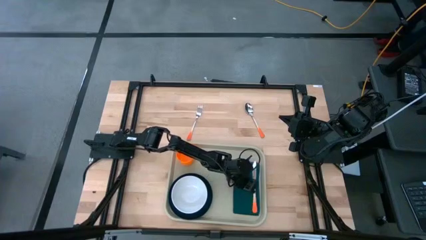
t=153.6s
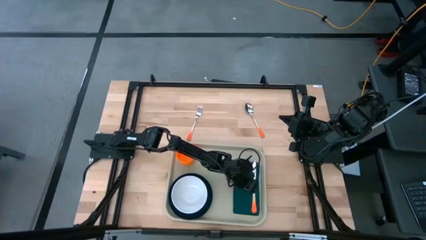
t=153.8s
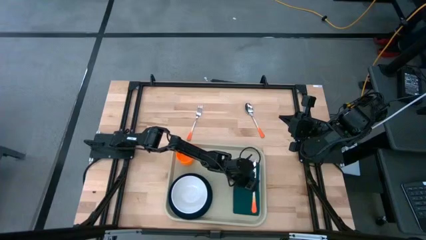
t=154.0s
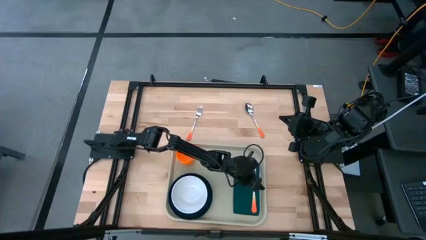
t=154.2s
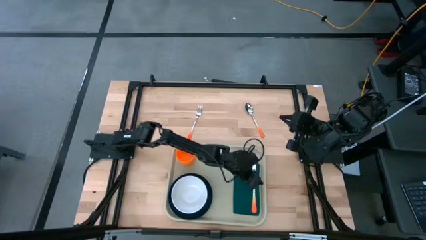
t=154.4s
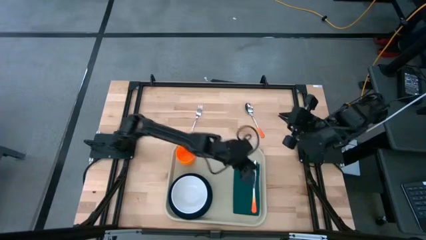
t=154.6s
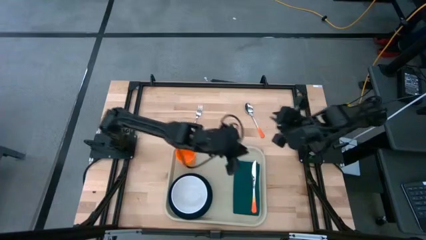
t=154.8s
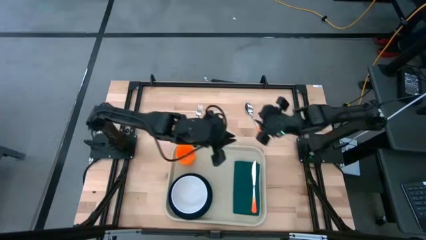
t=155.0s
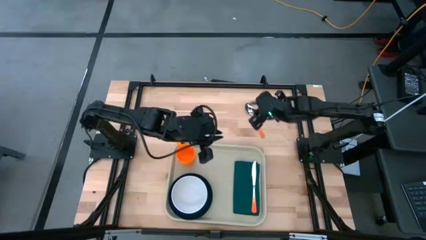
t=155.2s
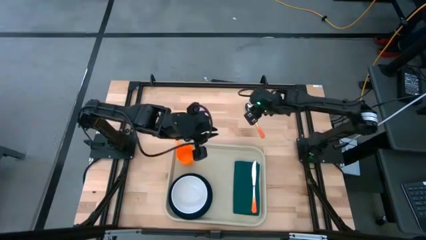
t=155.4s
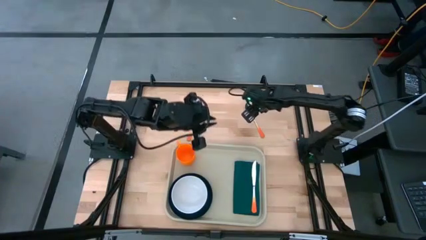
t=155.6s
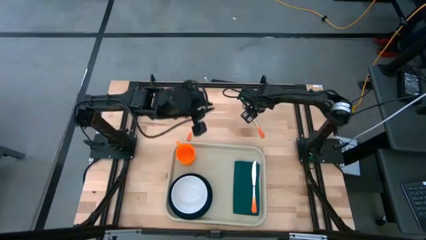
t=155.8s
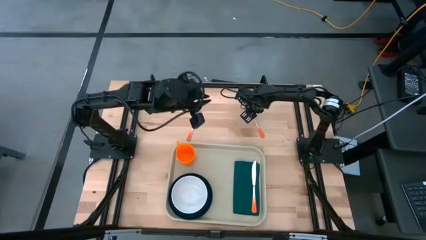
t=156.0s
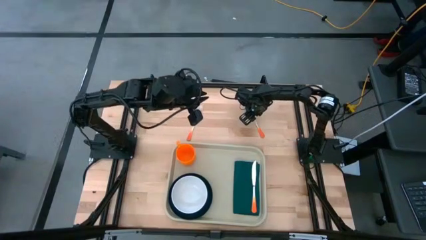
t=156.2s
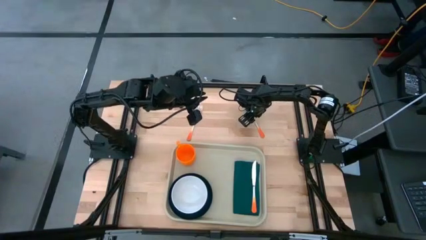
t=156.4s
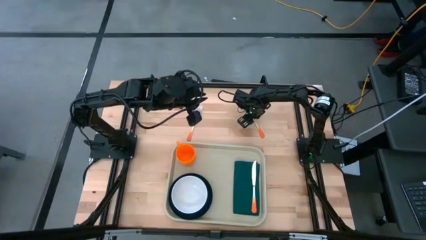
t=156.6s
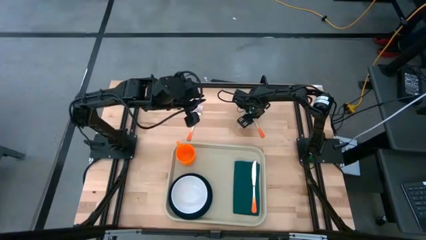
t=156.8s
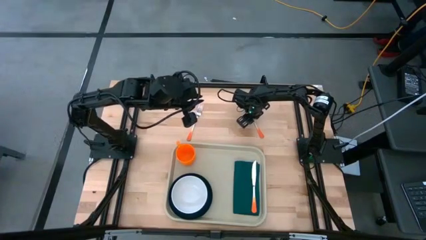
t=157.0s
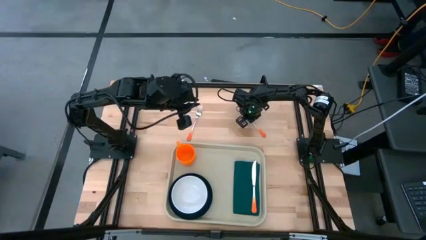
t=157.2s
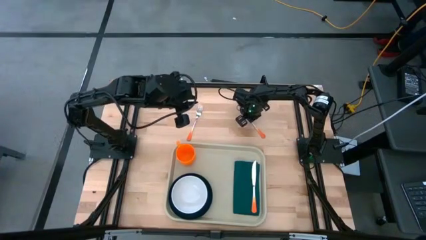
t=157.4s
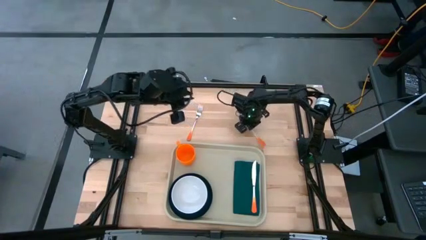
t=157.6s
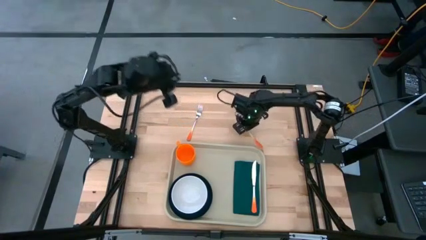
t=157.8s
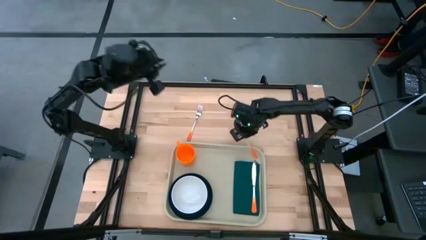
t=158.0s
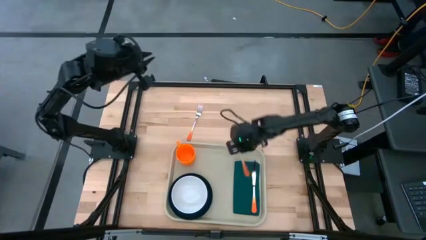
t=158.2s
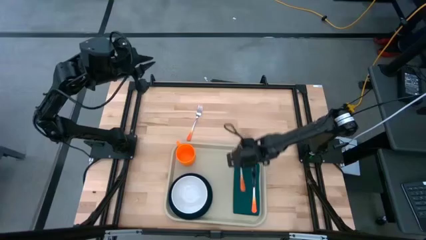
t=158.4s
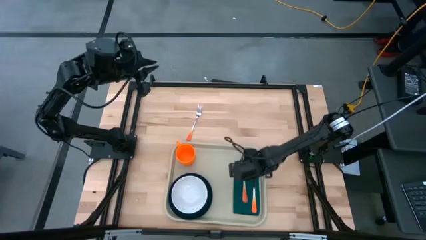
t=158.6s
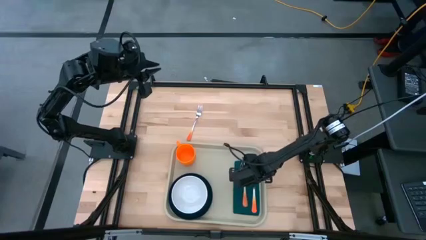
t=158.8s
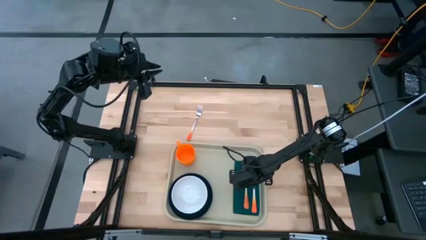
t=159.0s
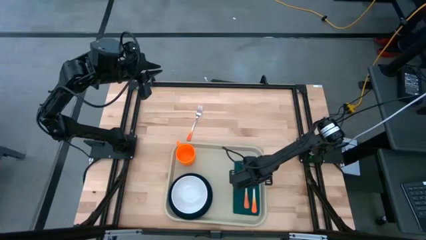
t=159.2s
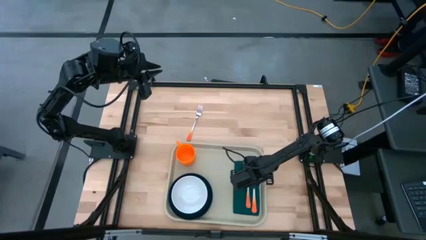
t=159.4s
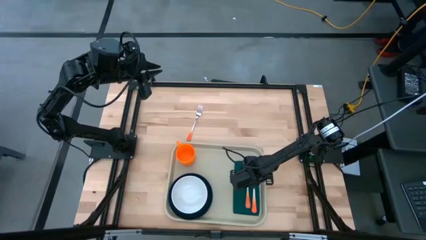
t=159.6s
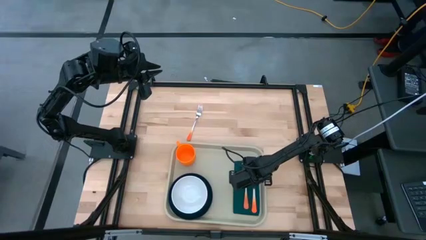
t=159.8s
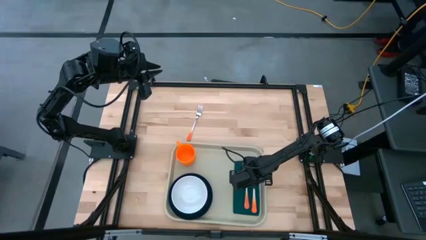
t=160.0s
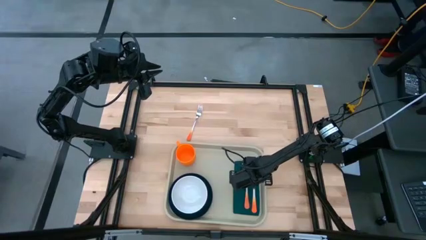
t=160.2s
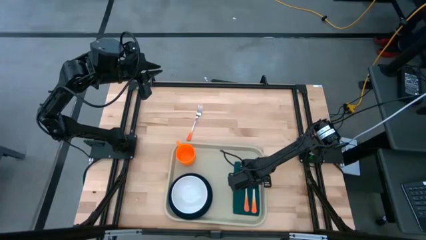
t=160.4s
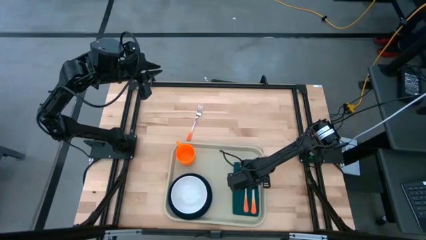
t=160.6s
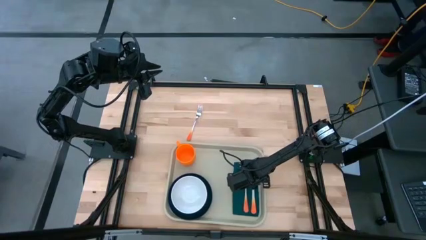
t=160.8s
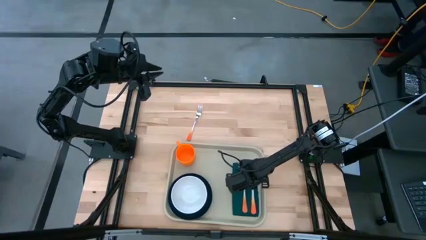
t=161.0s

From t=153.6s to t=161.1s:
Task: Set up tray
Put the spoon on the napkin to the left of the knife

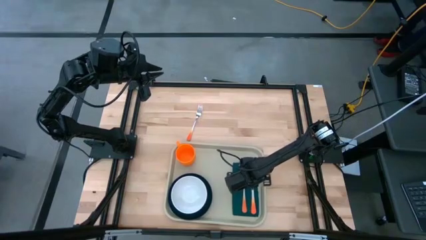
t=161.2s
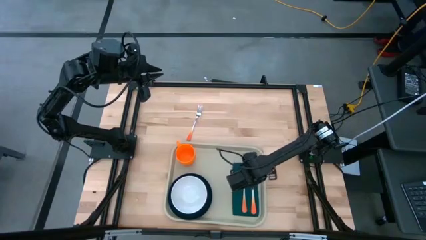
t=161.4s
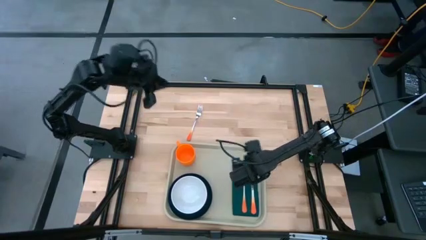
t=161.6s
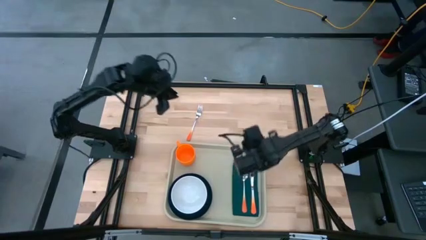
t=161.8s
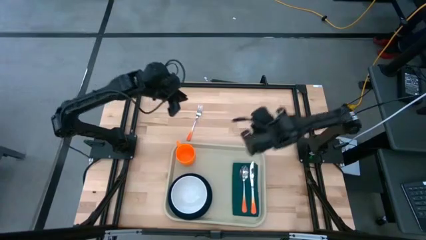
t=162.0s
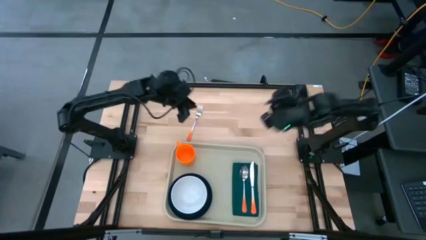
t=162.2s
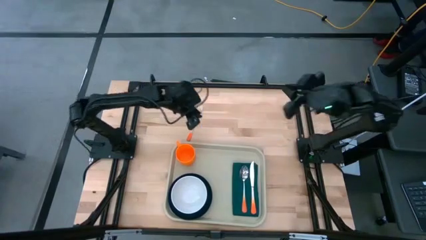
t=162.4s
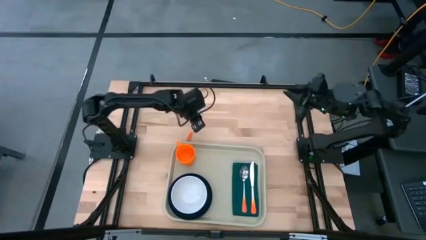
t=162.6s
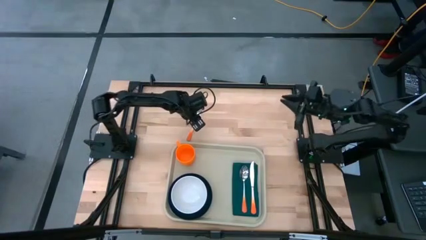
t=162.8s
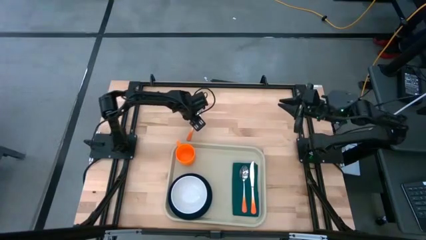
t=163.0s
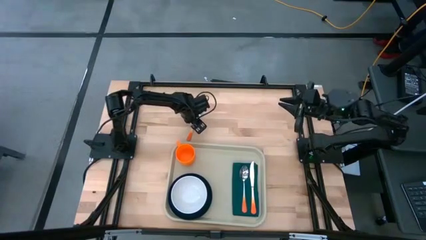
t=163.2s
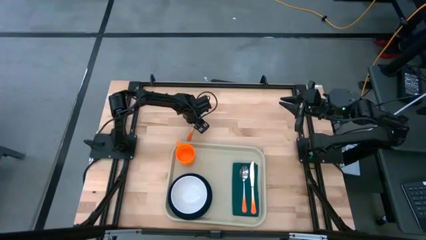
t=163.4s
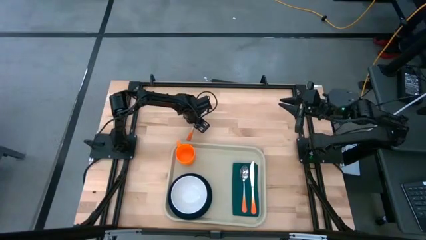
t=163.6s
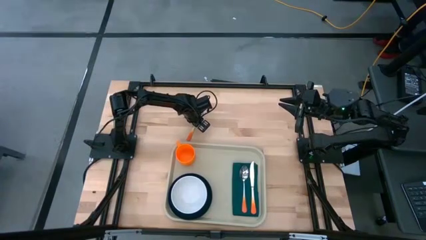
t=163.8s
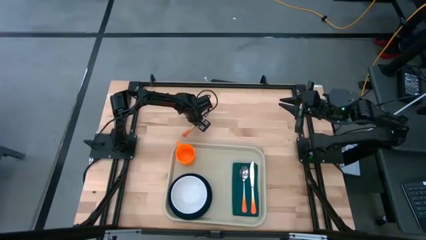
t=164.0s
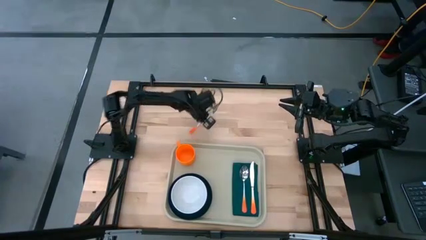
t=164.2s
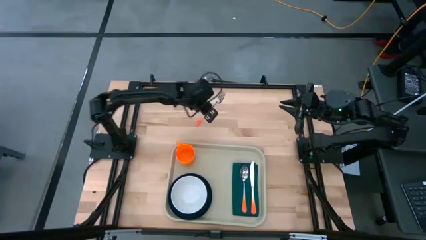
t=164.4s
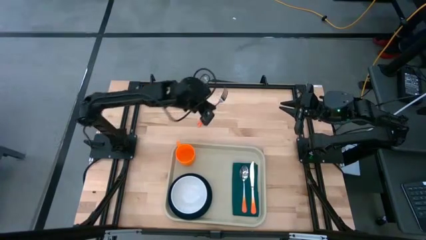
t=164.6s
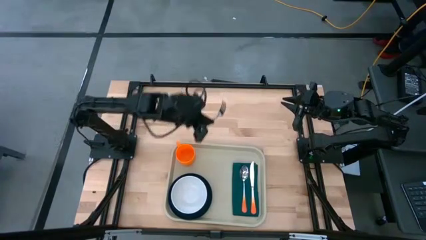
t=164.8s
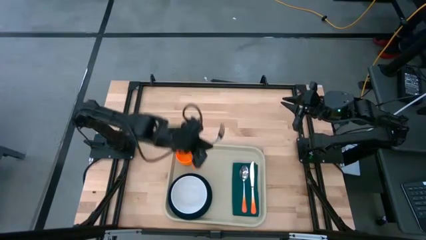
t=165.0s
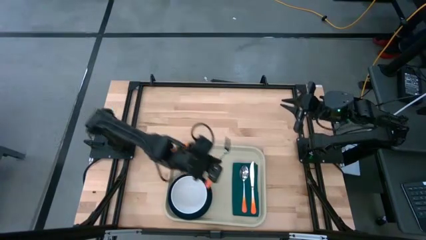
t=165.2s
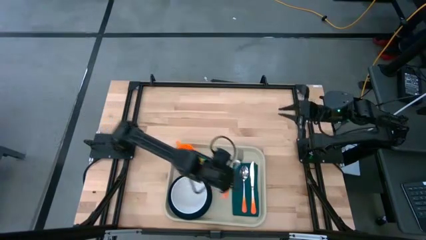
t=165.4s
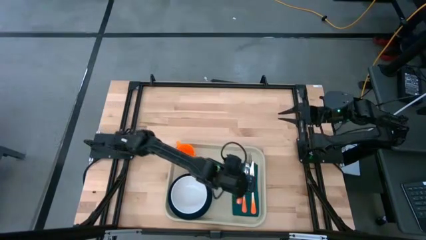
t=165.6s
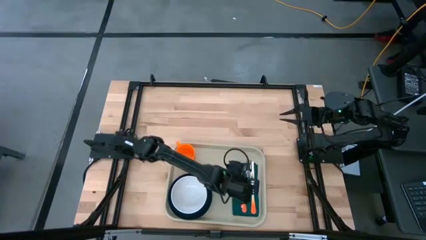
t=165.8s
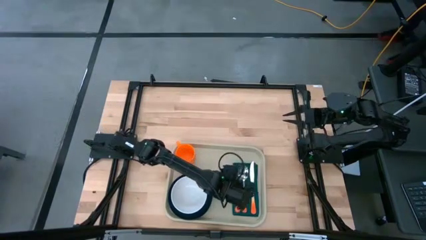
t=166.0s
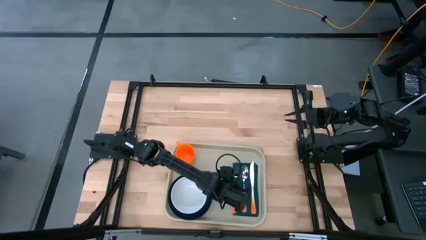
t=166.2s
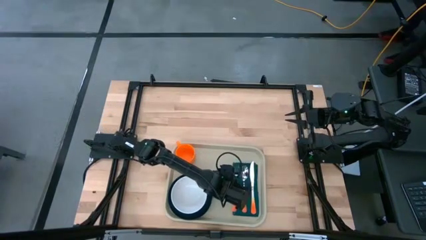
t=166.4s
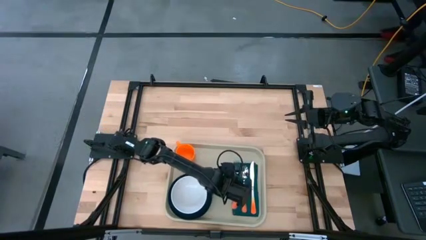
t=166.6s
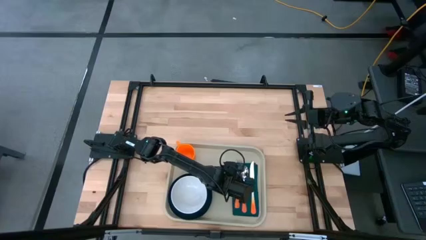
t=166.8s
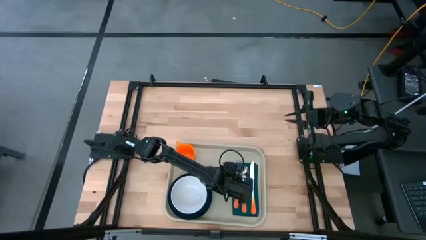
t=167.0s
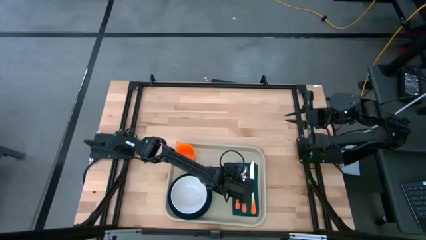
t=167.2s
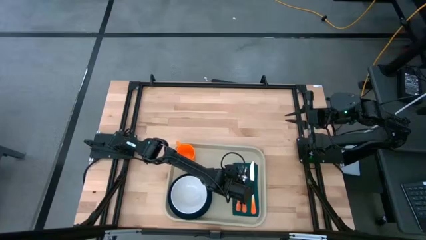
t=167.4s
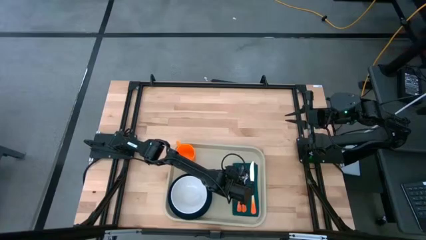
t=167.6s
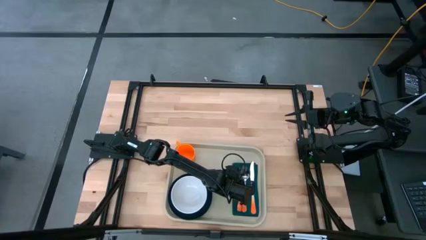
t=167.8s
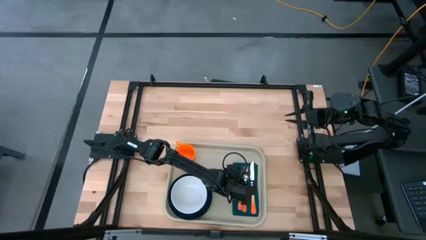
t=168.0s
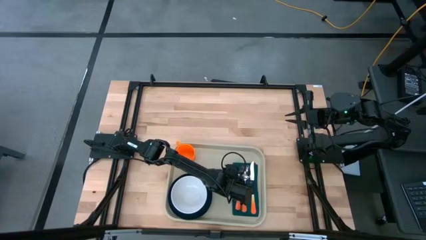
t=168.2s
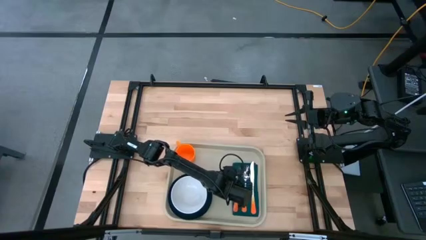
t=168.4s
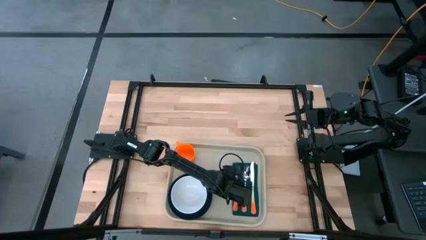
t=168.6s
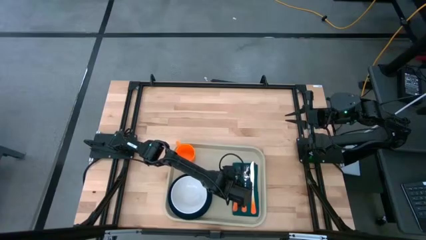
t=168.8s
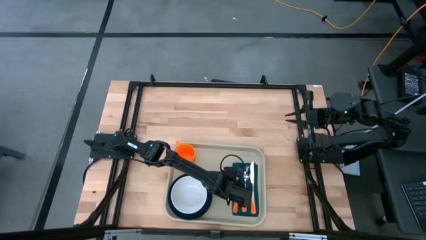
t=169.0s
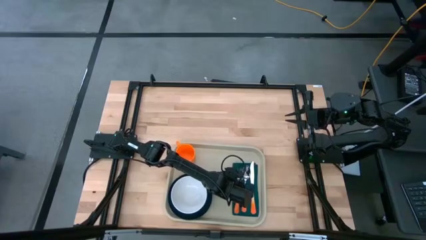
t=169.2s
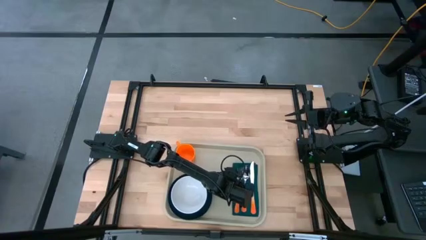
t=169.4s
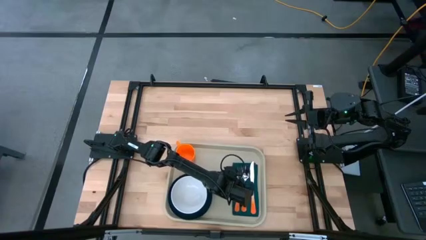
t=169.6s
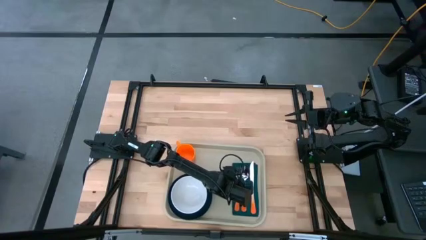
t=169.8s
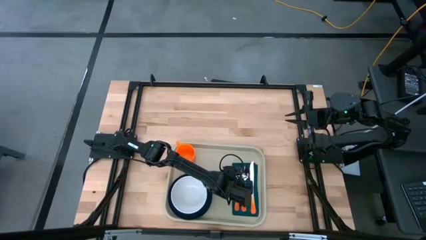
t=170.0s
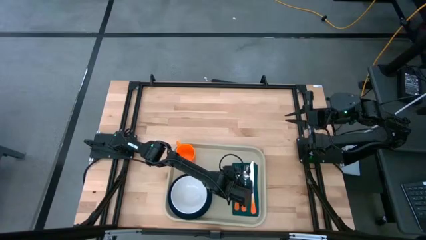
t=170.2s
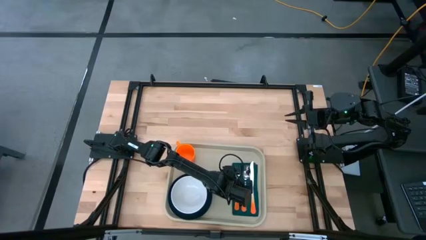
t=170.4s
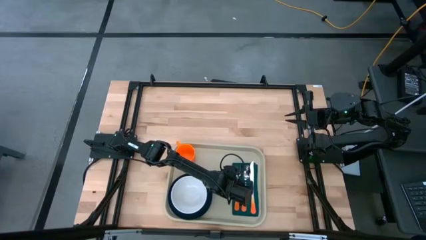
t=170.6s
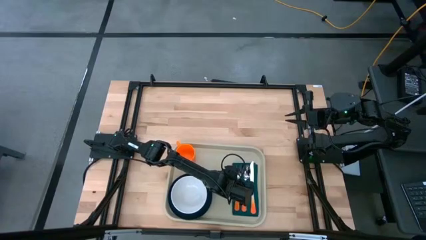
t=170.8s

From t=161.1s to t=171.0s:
Put the fork on the napkin to the left of the spoon
